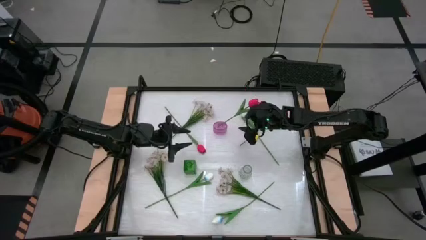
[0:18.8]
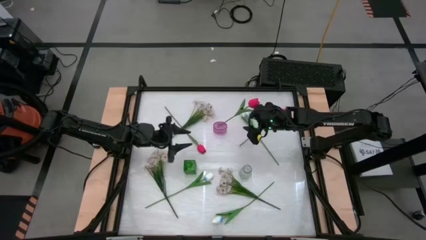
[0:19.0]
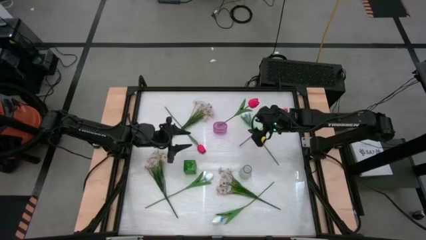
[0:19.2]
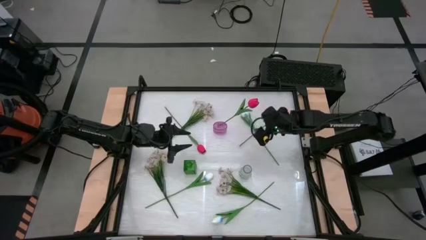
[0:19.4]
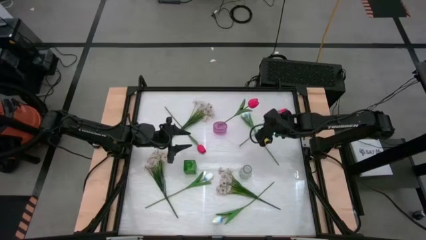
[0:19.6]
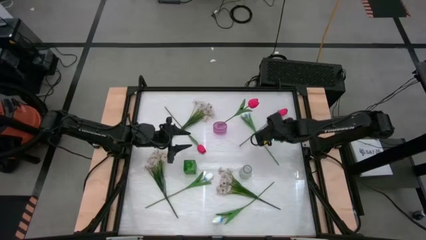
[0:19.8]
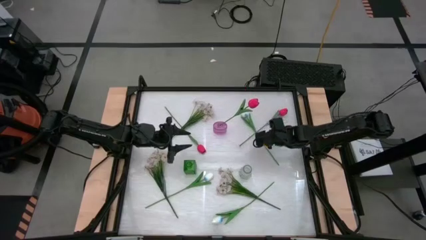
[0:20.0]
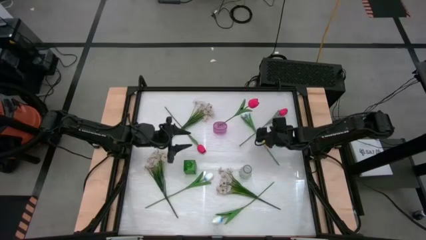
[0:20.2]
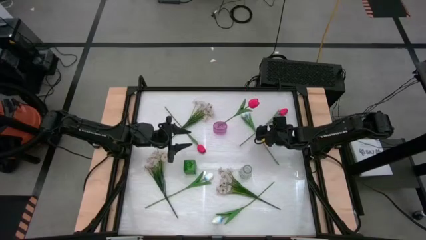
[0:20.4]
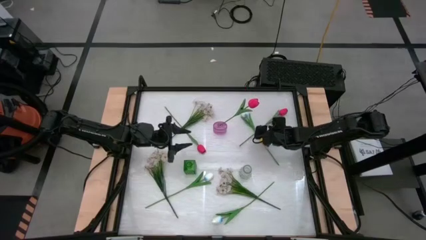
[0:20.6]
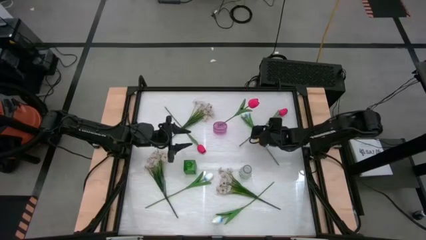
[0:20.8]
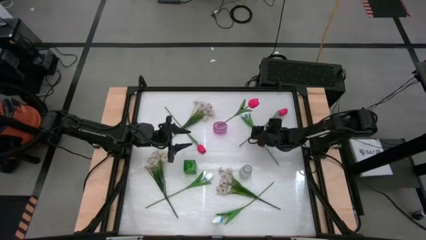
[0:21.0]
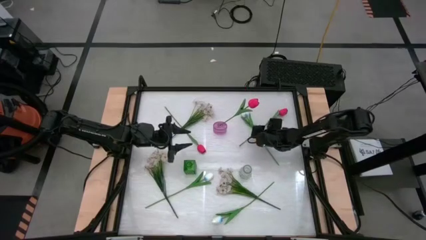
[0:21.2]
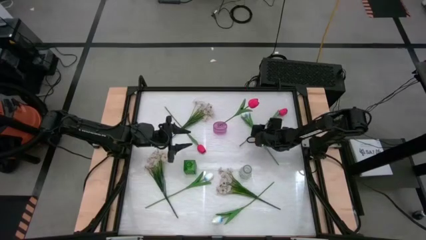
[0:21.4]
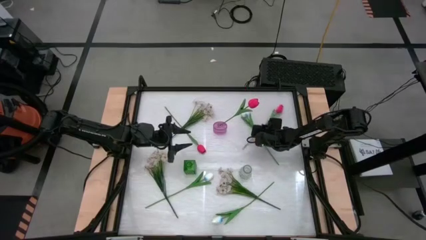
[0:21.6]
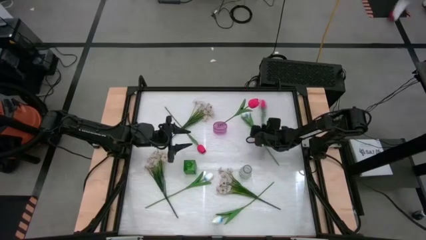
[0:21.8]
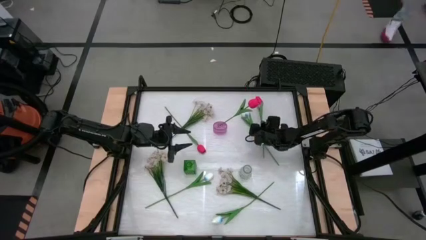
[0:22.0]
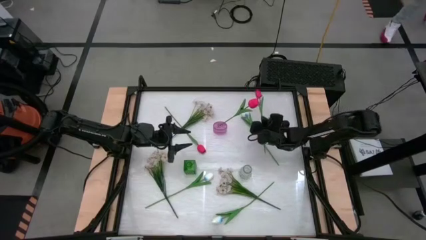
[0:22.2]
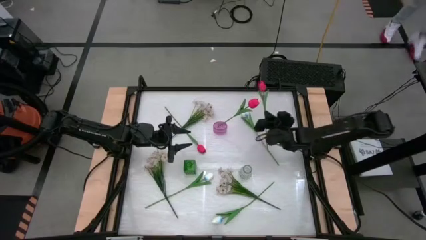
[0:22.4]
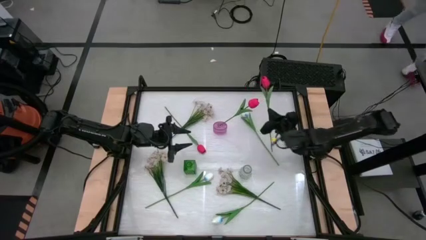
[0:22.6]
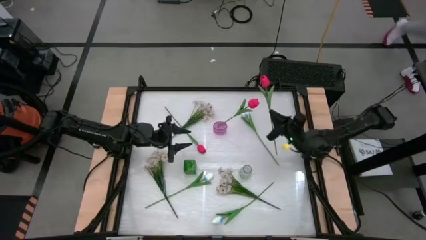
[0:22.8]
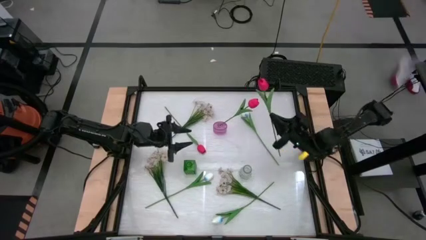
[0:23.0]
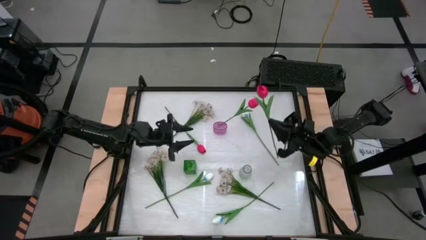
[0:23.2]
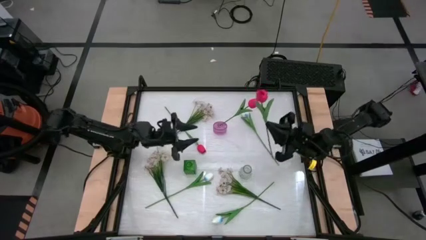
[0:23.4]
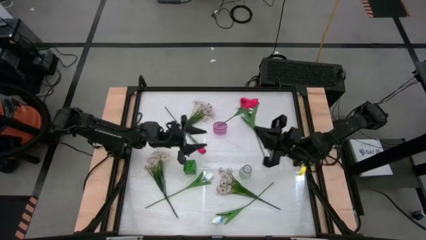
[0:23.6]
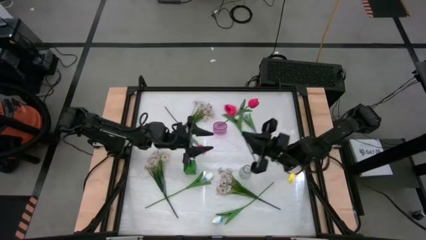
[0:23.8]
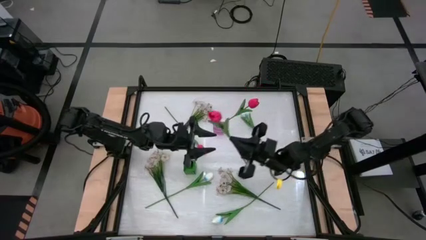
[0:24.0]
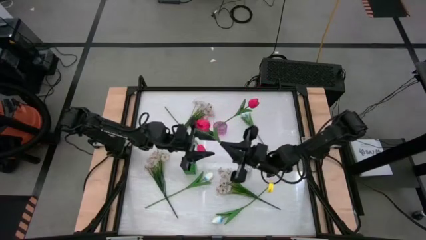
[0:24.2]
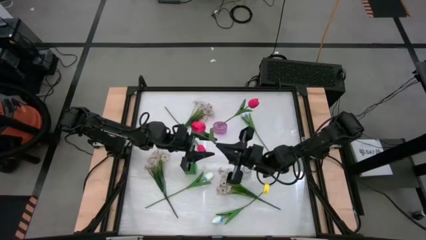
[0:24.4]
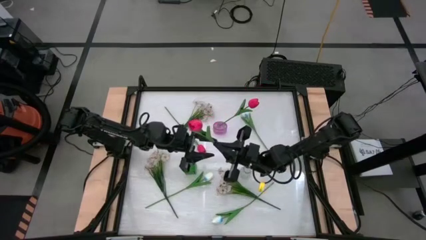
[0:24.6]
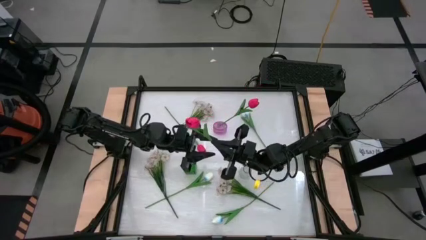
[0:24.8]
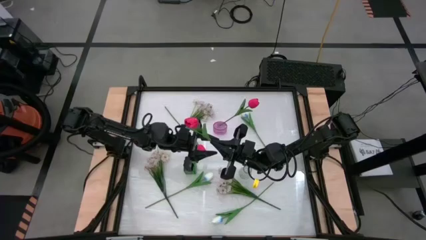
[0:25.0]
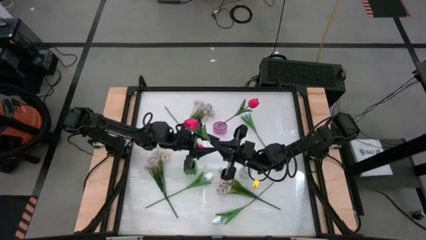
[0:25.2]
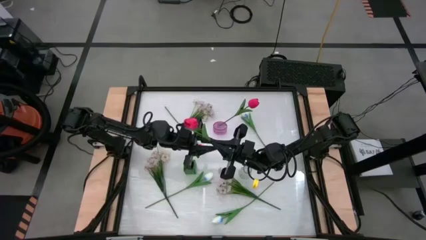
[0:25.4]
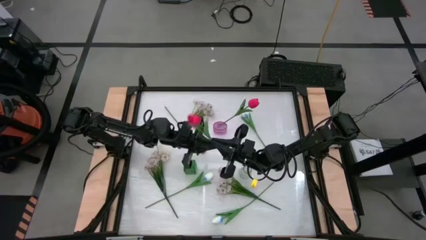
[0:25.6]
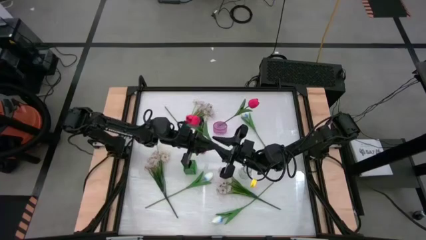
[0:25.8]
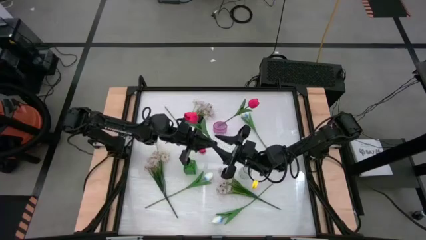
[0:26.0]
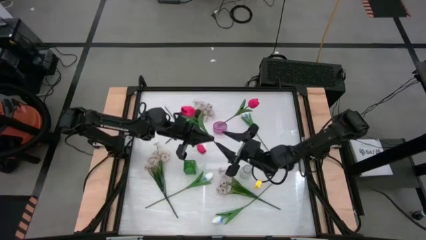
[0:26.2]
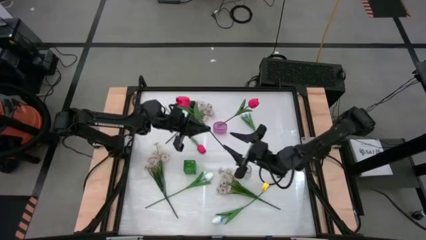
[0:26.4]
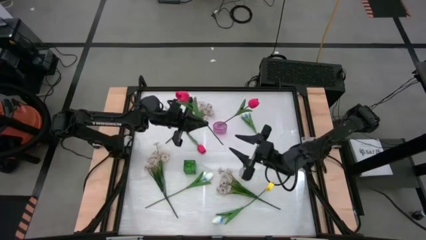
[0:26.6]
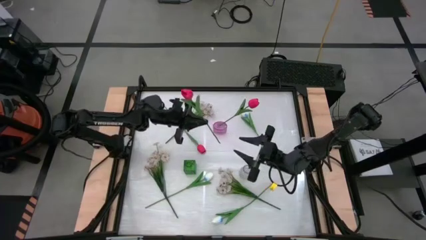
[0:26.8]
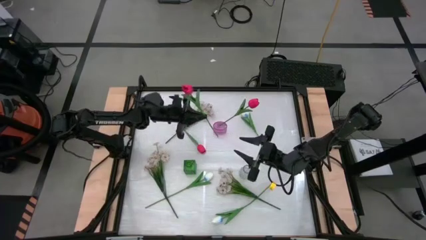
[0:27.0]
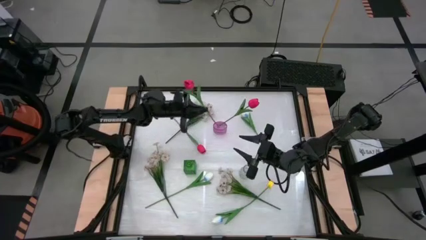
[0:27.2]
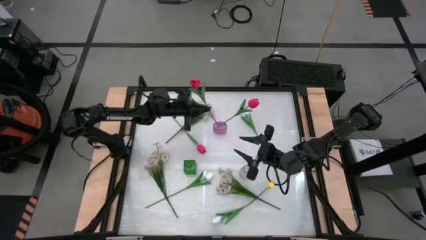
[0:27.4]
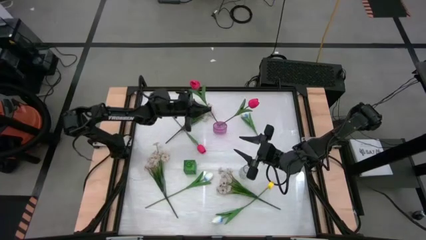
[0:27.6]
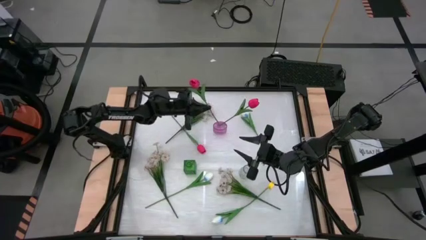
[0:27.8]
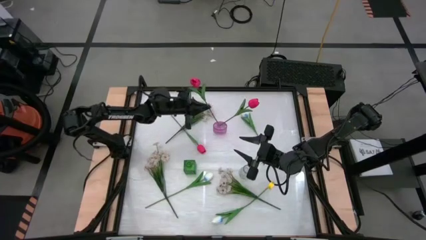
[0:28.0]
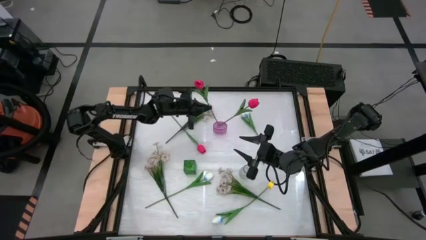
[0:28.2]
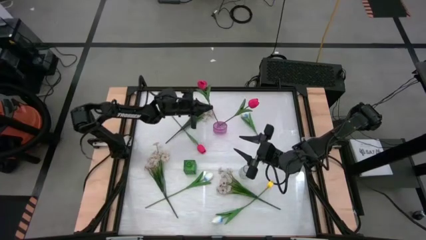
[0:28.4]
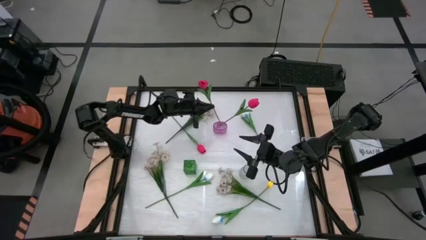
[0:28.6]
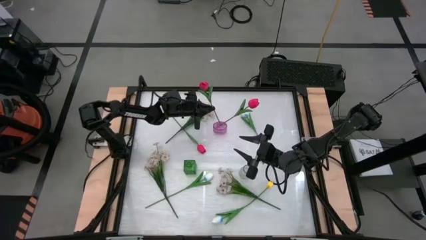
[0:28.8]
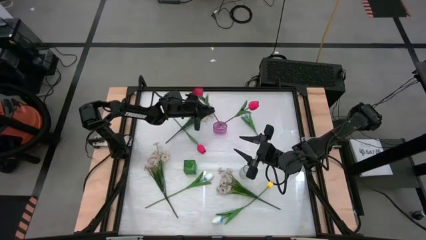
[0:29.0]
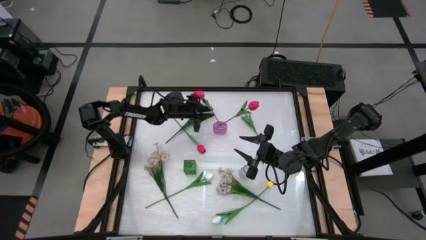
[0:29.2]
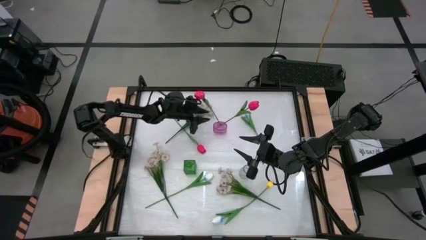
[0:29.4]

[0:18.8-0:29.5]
Task: Sort flowers into vase by color
Put the right red flower into the purple vase

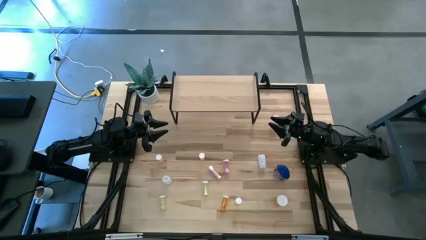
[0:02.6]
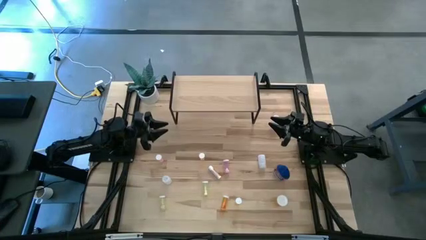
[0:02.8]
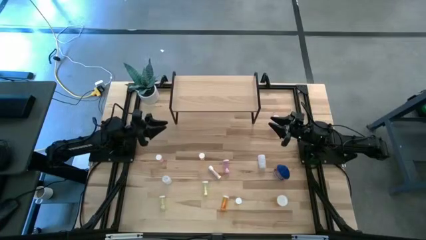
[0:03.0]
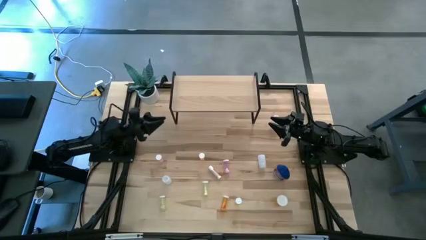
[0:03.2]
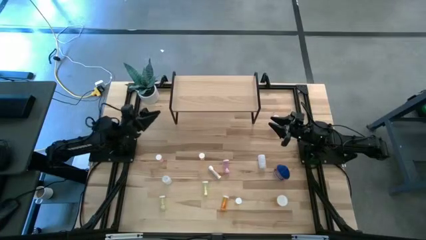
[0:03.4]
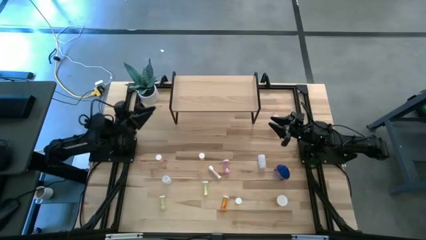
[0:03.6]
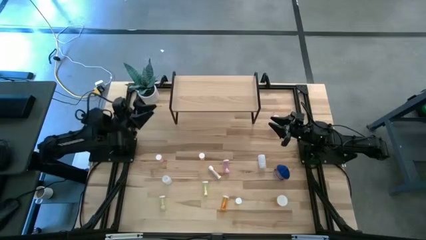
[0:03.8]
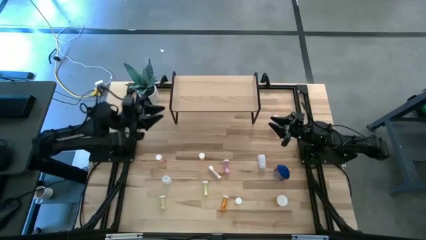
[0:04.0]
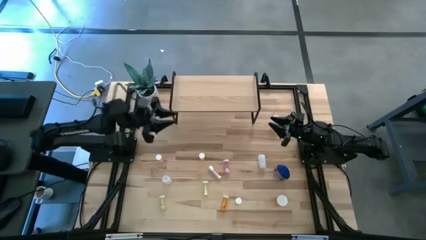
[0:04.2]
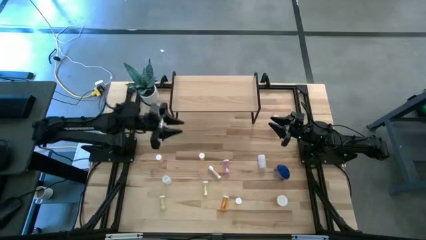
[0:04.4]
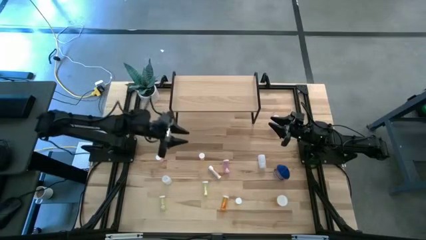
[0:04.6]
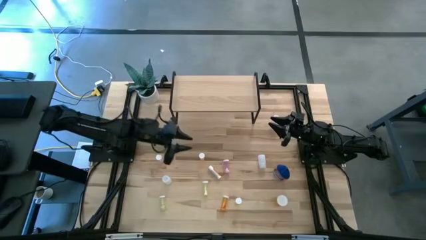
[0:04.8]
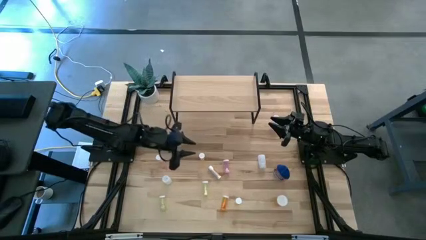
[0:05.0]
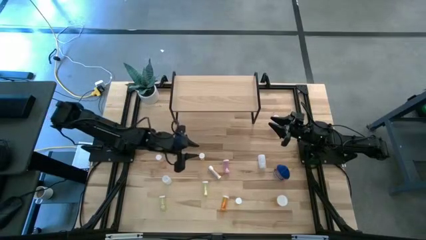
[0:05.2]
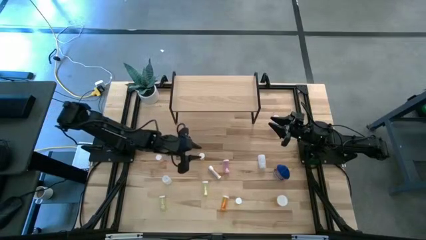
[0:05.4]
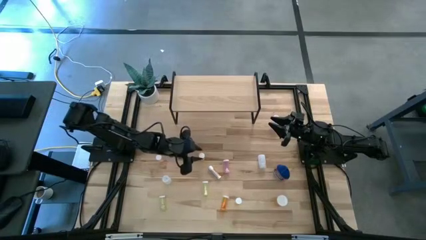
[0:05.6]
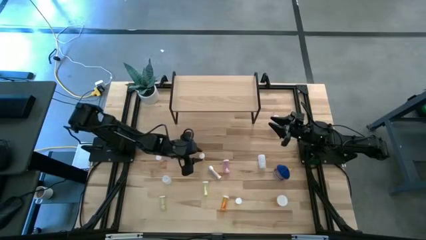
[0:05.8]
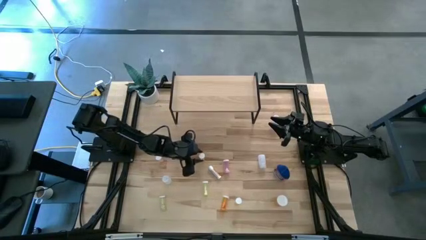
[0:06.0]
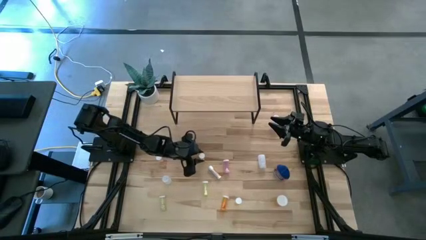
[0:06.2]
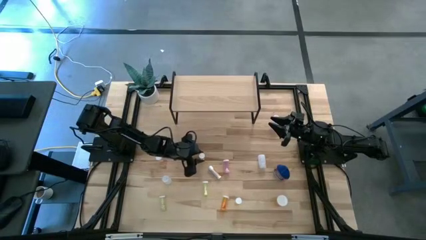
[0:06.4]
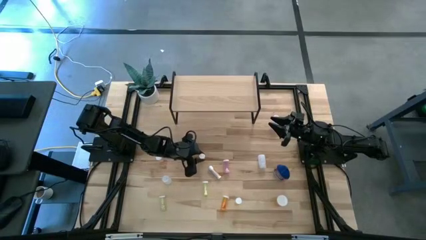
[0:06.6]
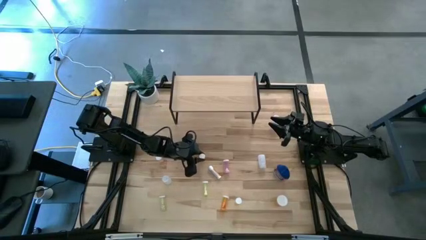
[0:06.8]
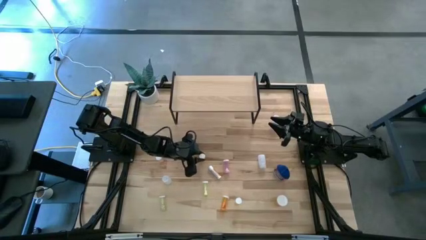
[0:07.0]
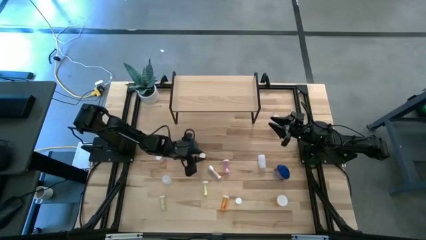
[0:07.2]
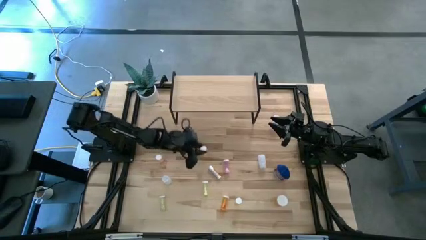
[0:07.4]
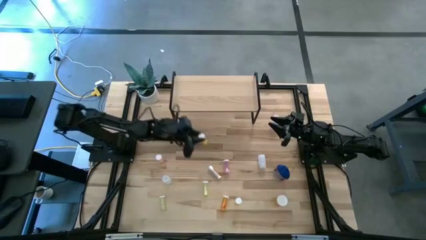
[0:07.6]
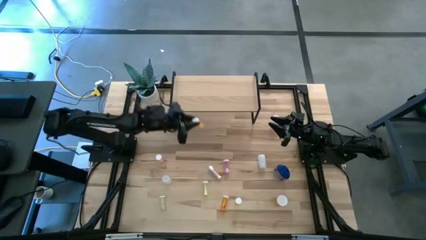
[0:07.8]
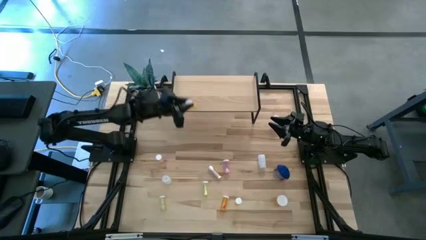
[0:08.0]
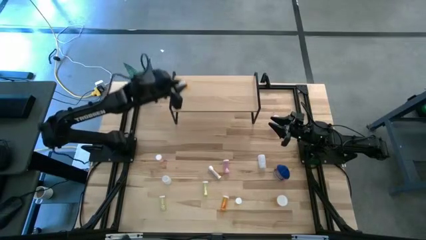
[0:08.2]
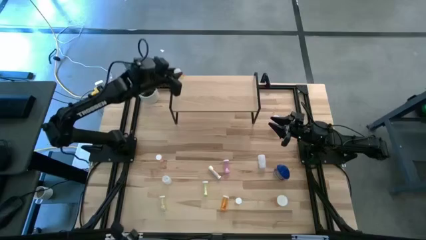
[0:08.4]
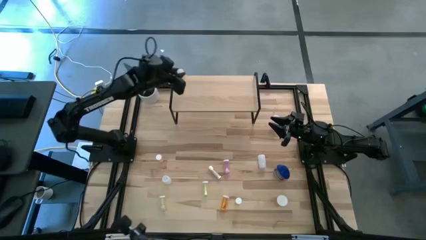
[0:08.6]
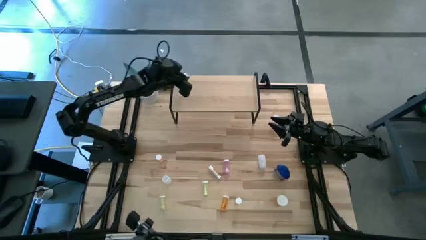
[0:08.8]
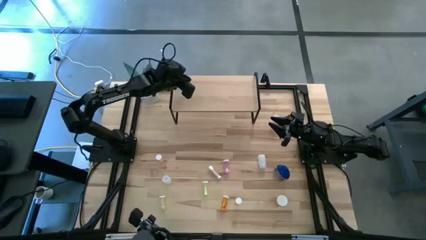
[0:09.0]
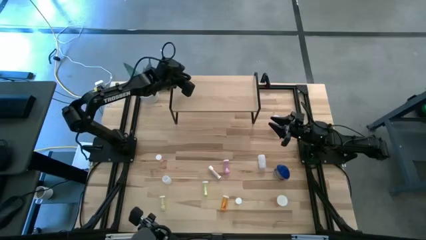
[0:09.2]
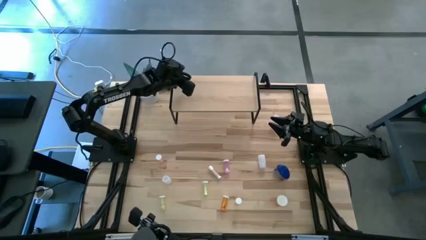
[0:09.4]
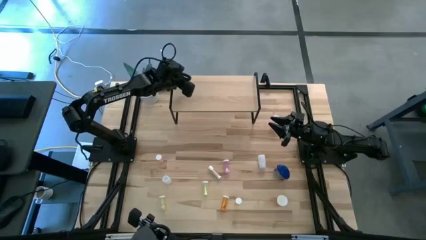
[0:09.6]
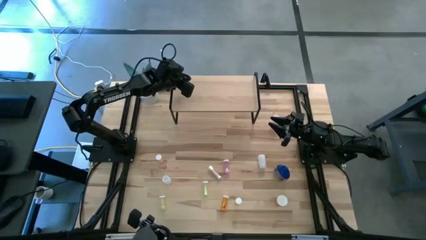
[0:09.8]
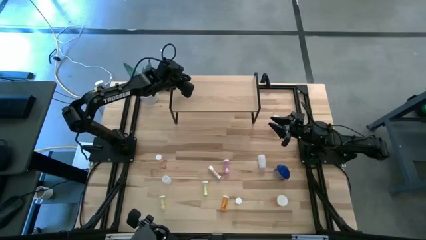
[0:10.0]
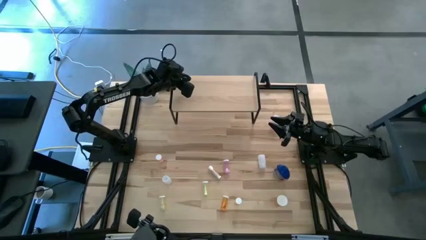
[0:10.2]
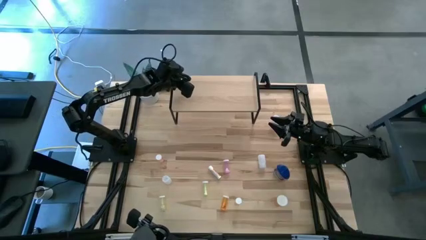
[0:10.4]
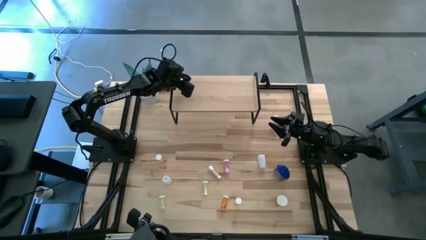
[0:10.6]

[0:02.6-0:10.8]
Task: Pick and place medicine bottles onto shelf by color
Put the top small orange pill bottle on the shelf
